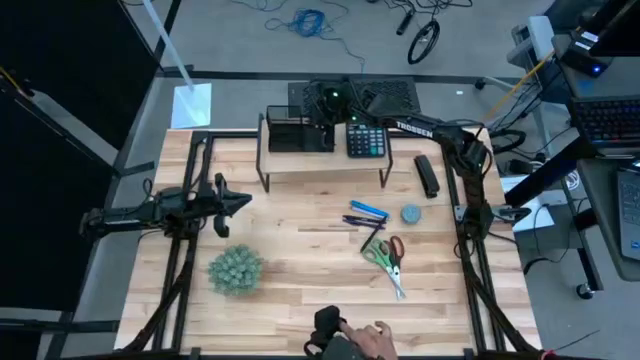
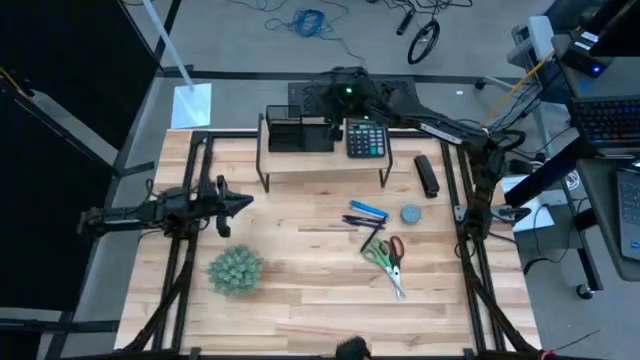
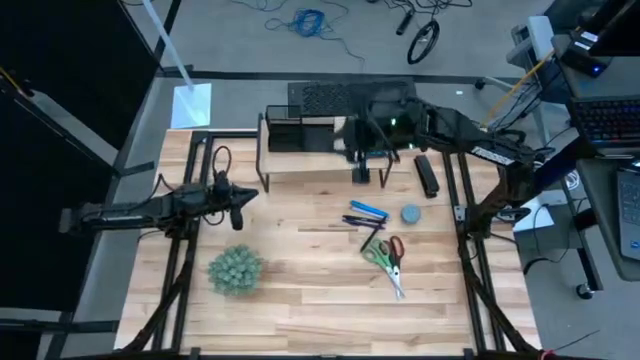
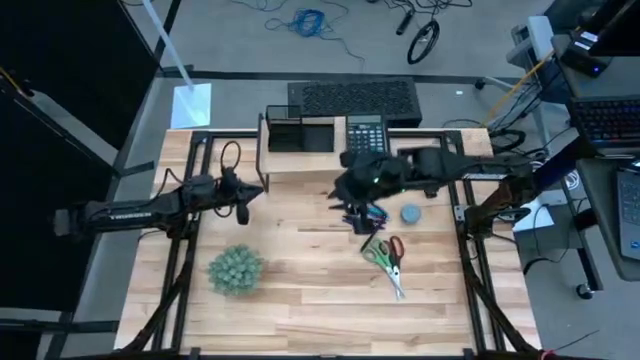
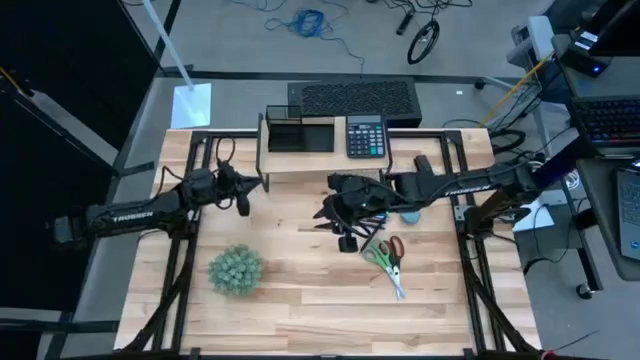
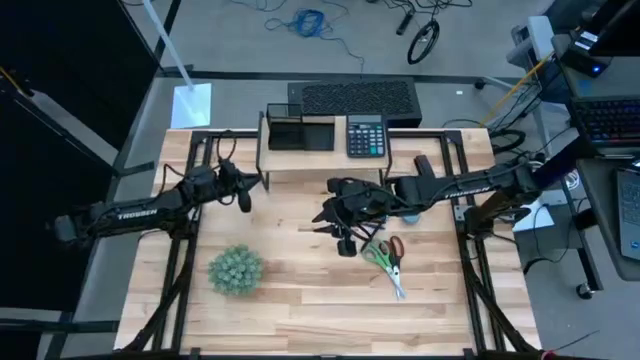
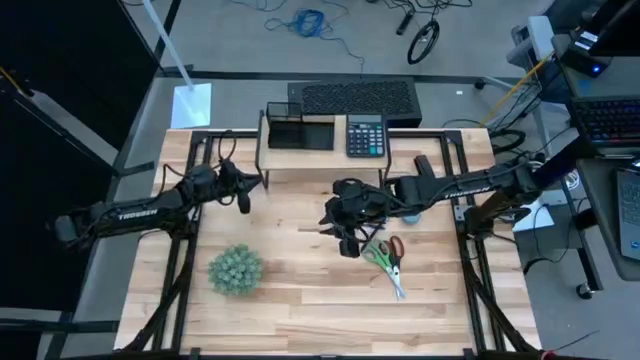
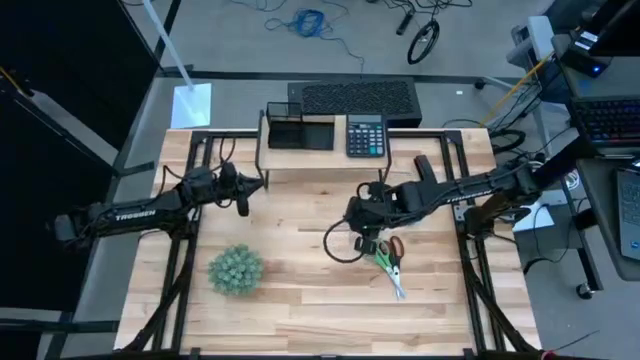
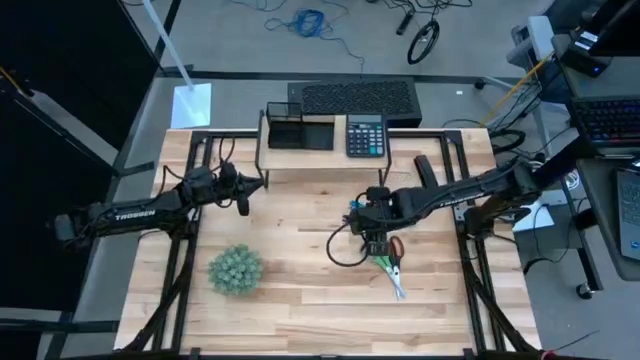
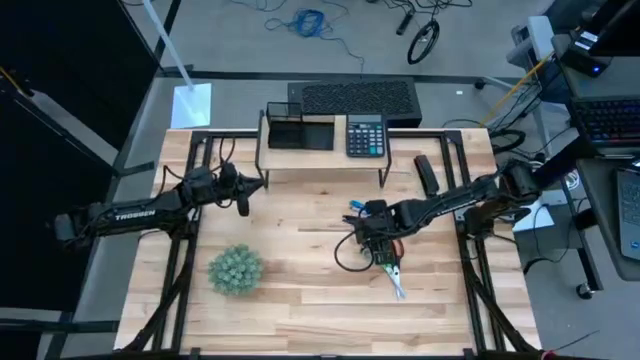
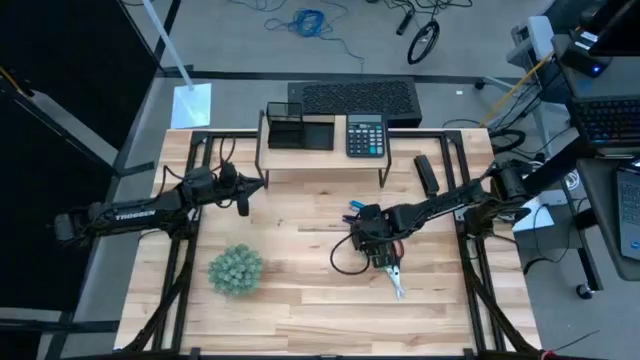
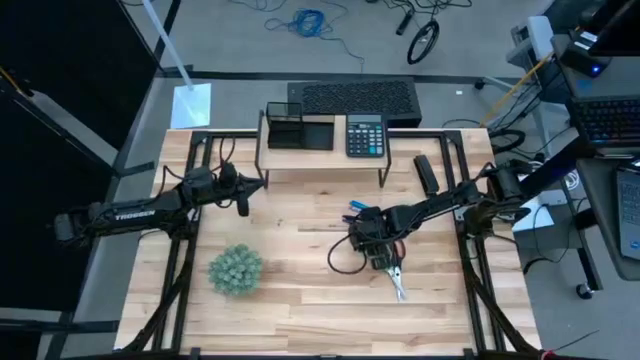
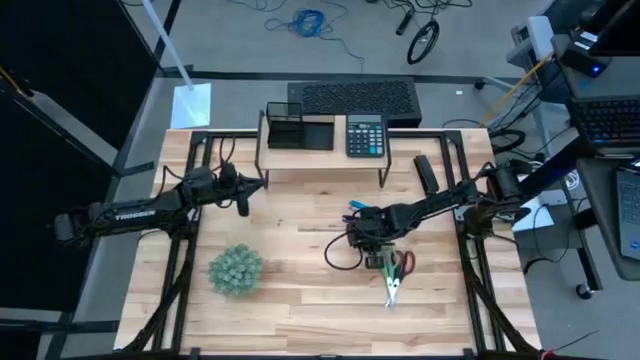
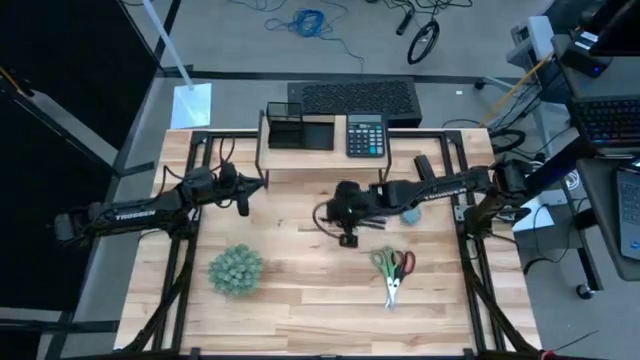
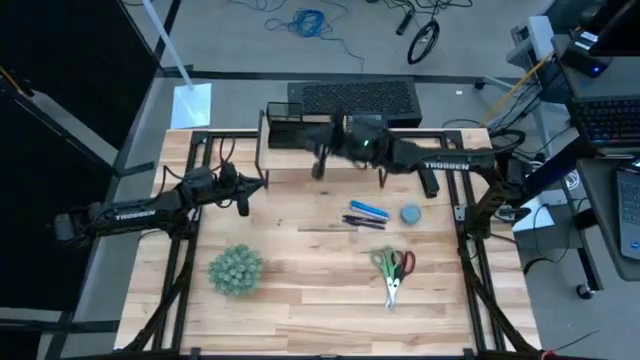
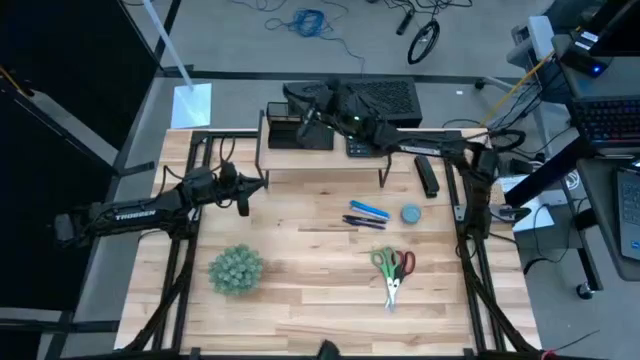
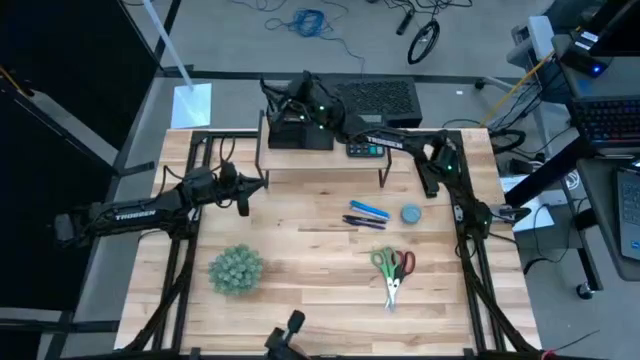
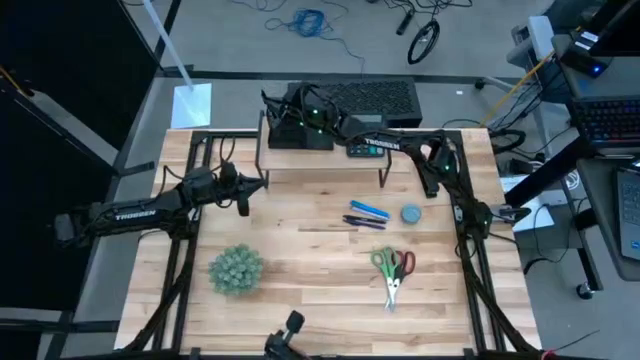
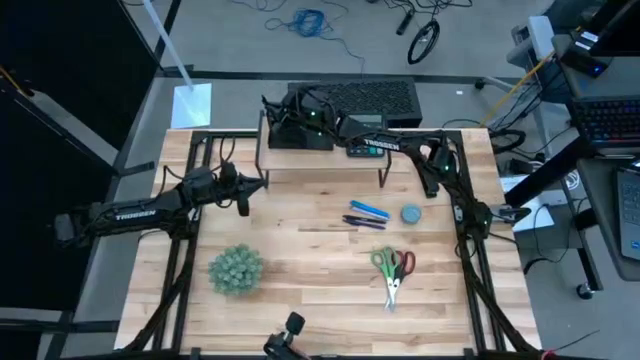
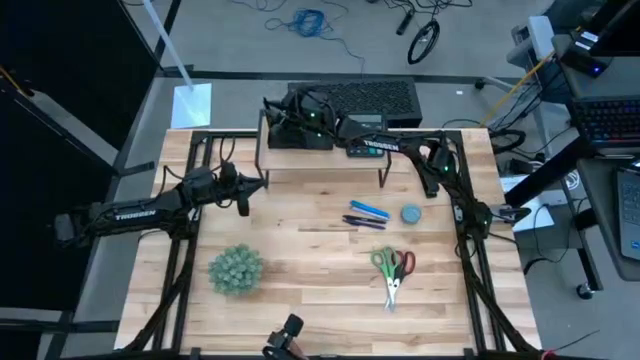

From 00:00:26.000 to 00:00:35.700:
Task: Pick and place office supplies into organizer
Put the black pen into the desk organizer on the shelf

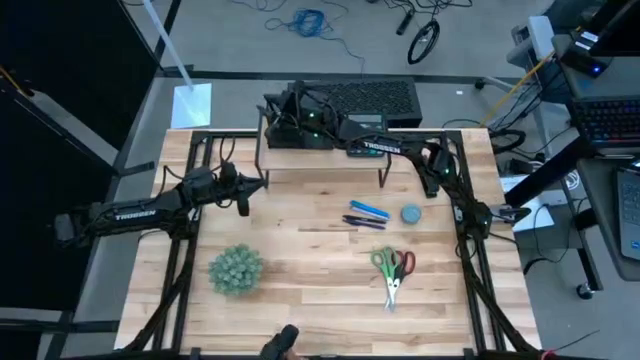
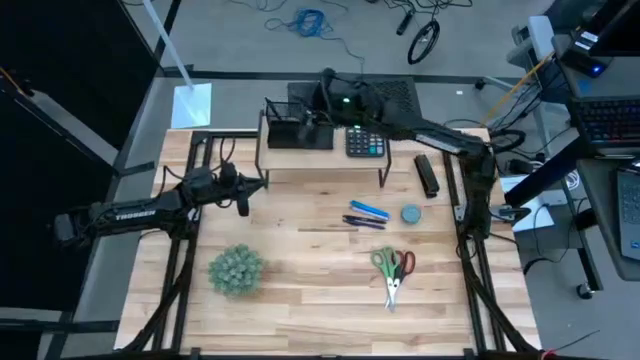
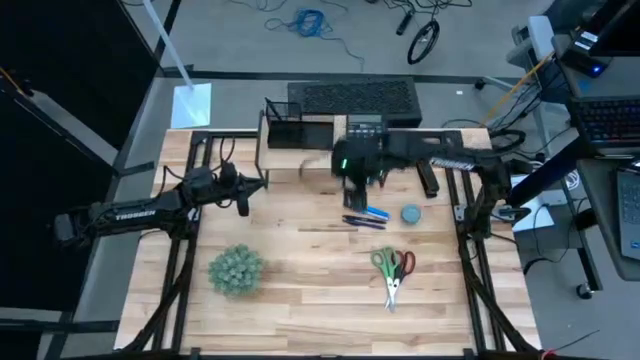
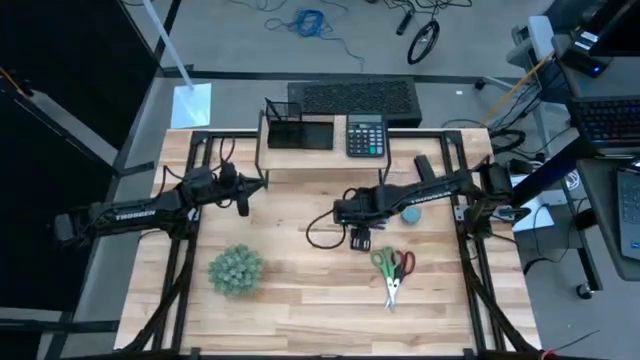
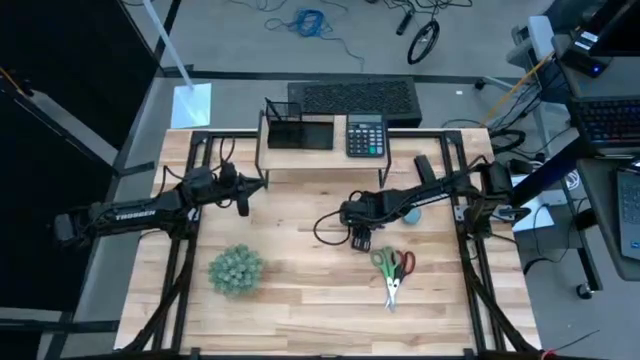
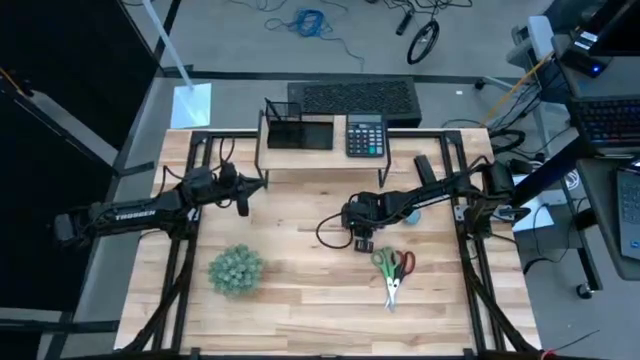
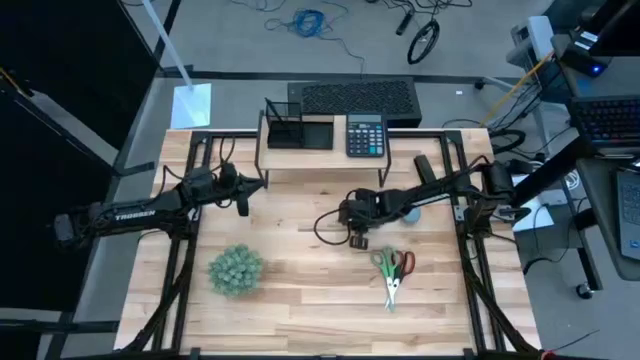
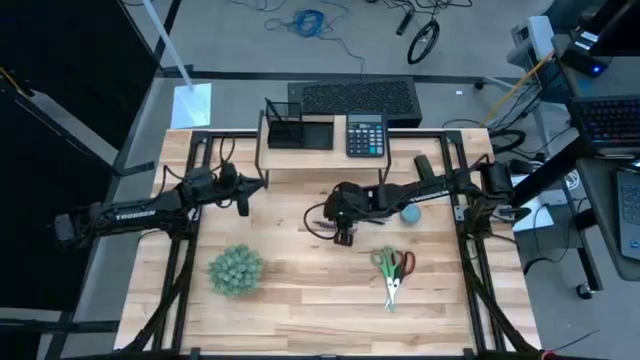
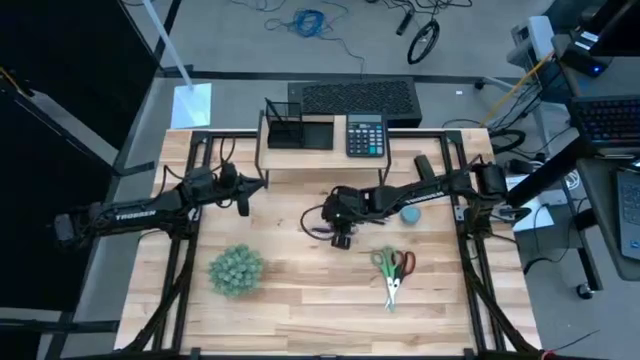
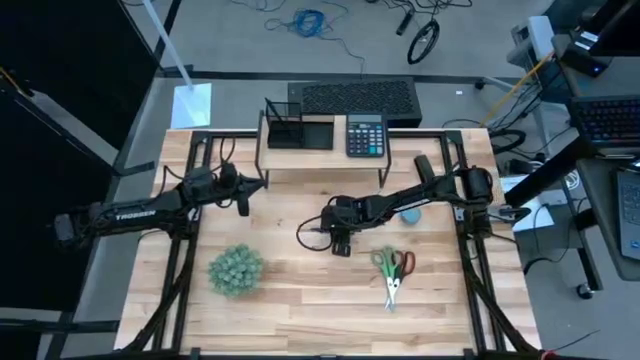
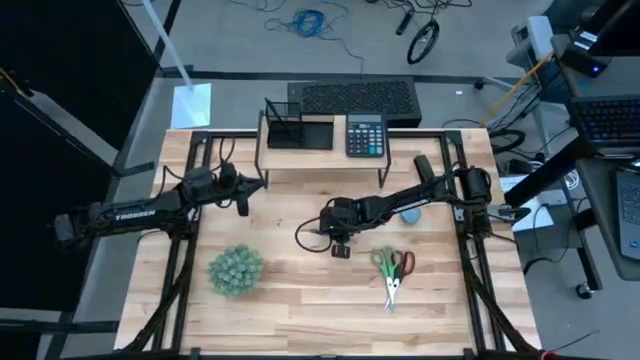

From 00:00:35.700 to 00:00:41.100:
Put the dark blue pen into the desk organizer on the shelf

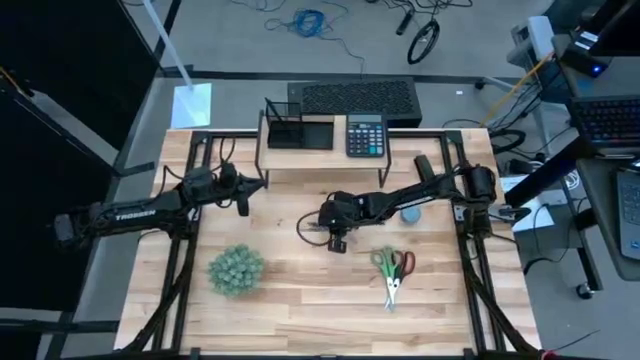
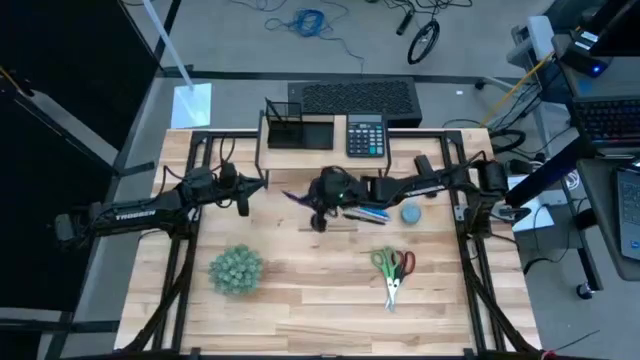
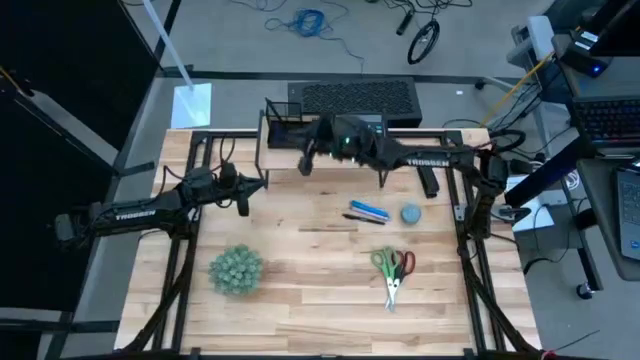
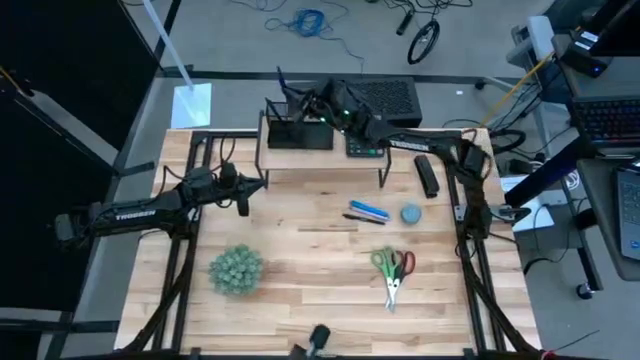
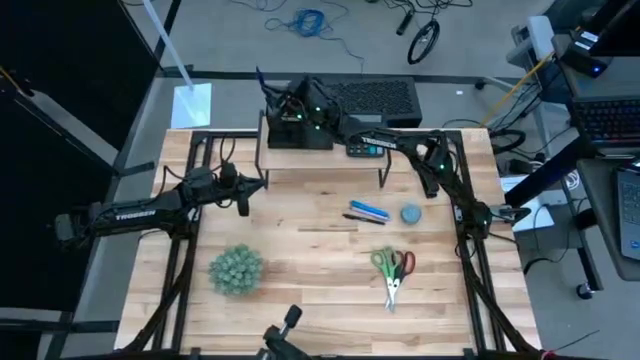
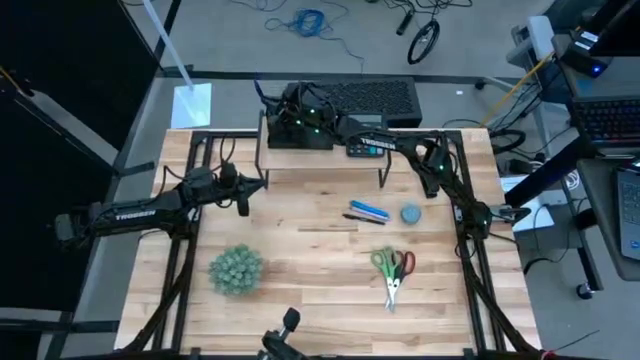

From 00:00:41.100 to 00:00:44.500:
Put the dark blue pen into the desk organizer on the shelf

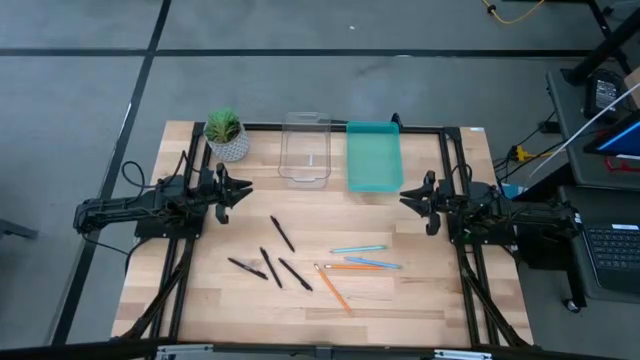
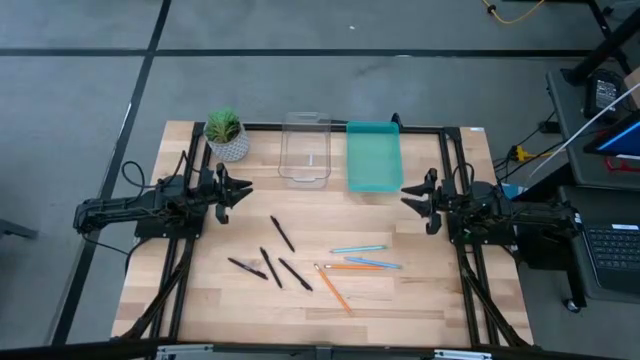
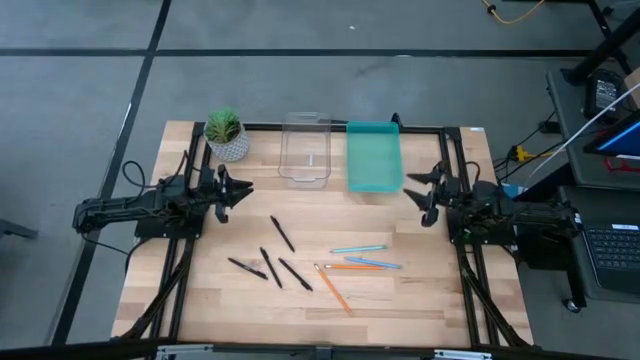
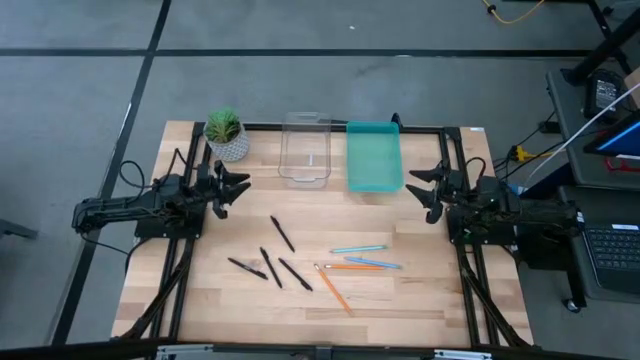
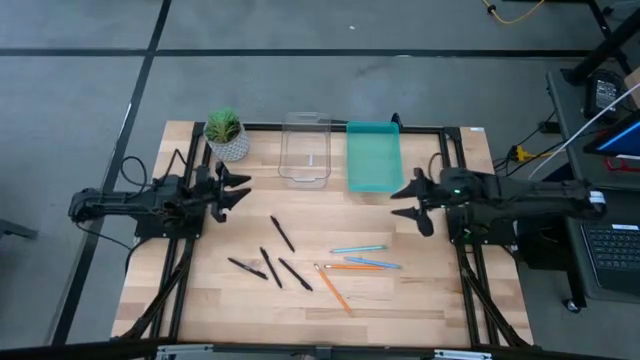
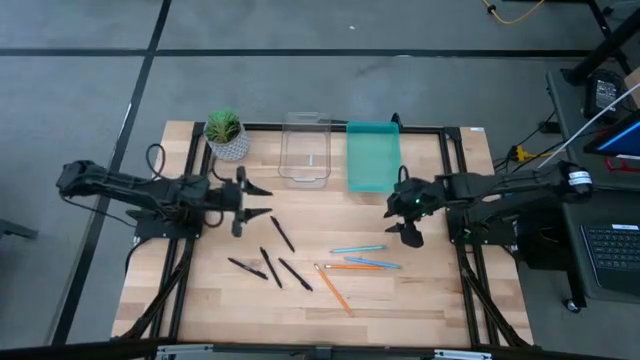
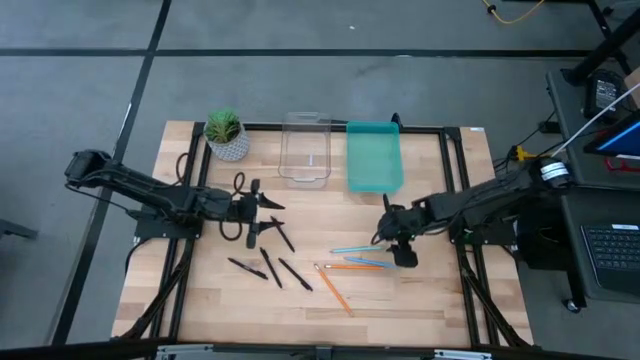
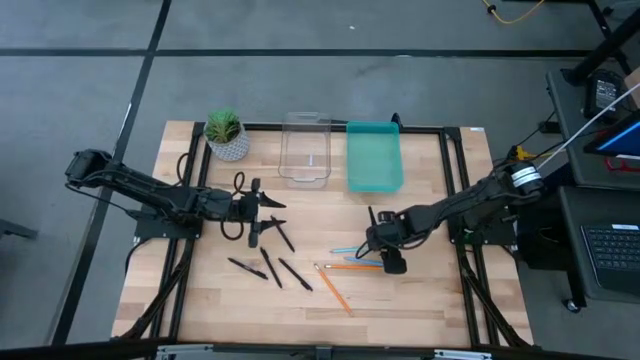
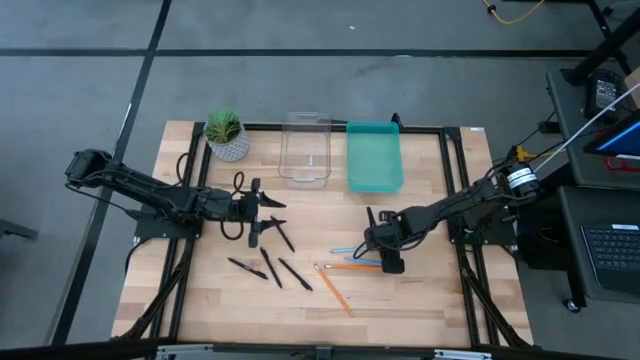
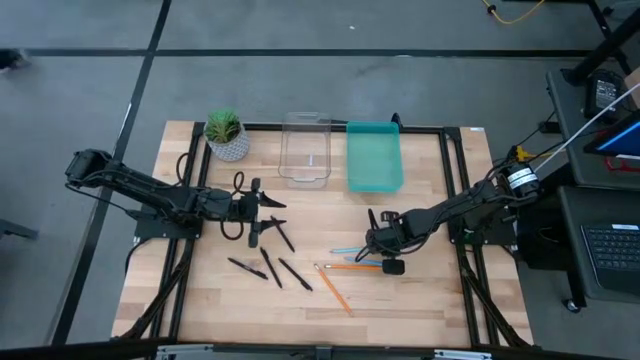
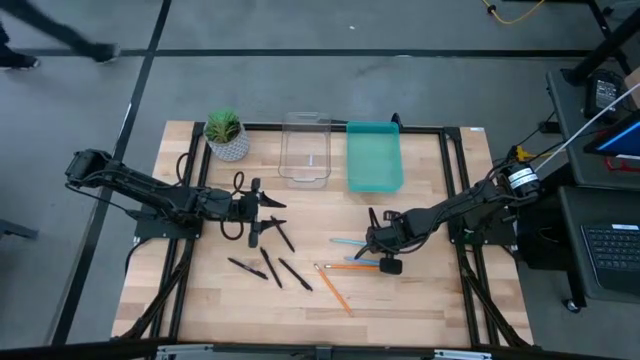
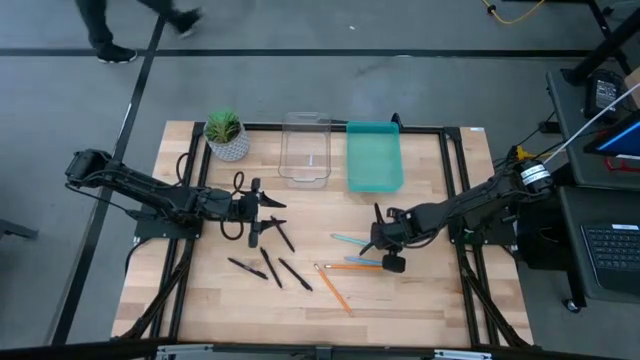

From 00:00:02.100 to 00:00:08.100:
Task: Sort pens & pencils
Put the light blue pencil into the blue bin
